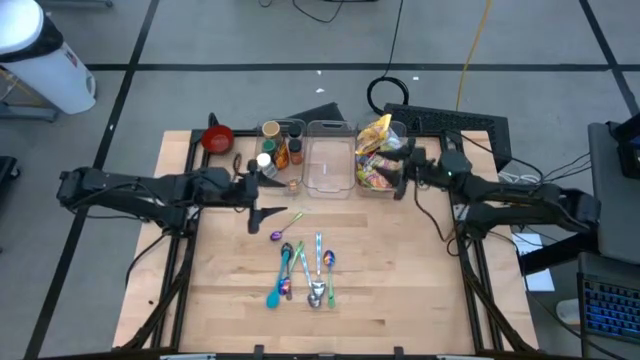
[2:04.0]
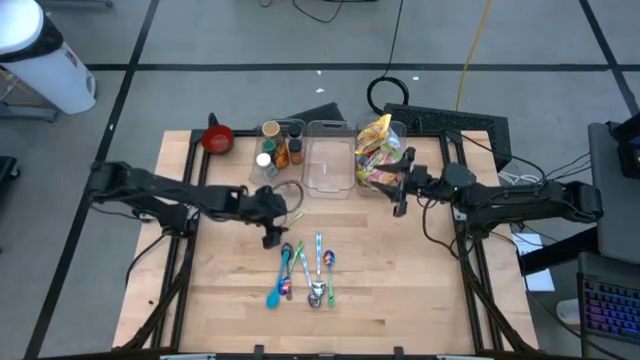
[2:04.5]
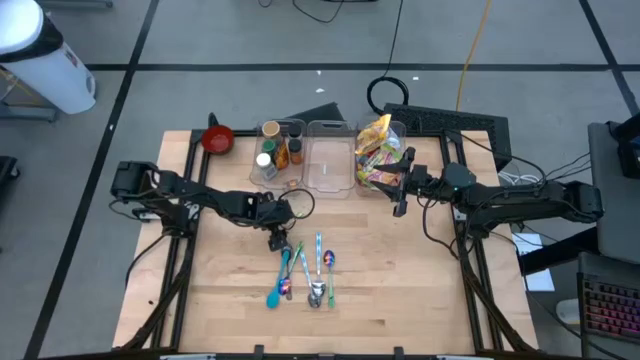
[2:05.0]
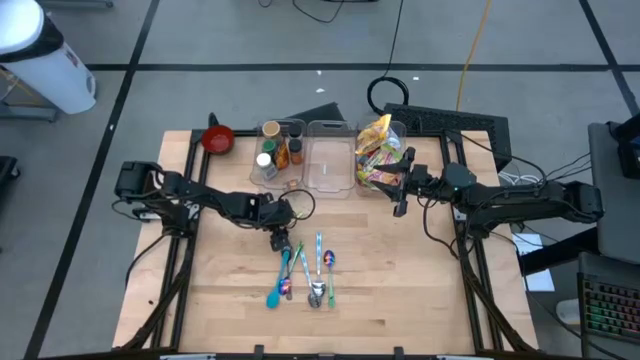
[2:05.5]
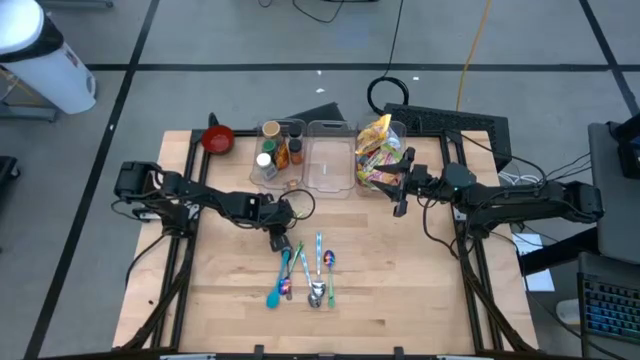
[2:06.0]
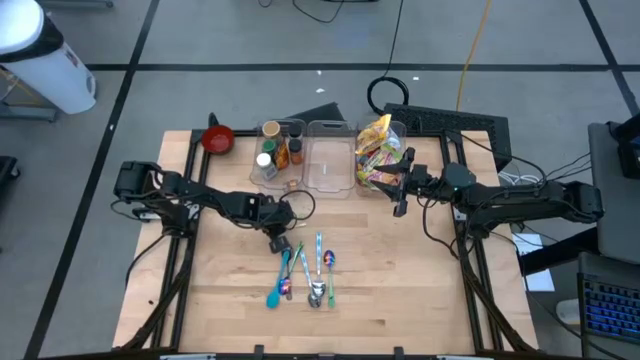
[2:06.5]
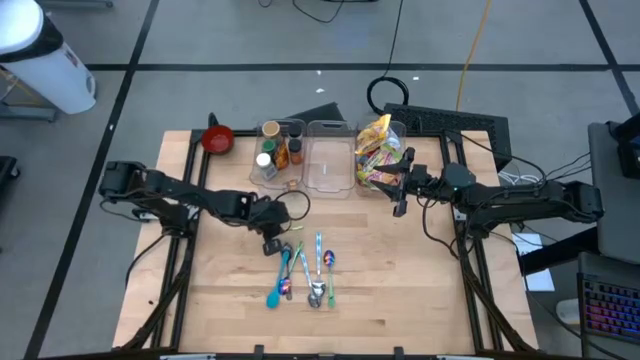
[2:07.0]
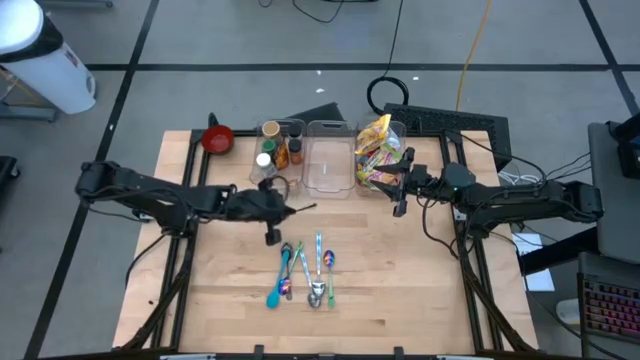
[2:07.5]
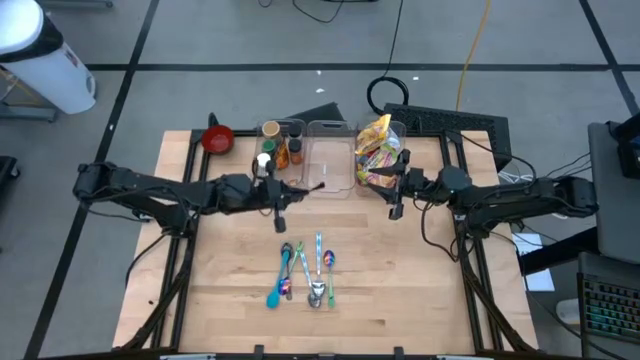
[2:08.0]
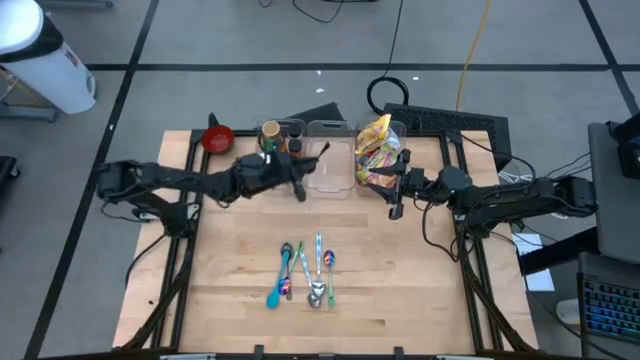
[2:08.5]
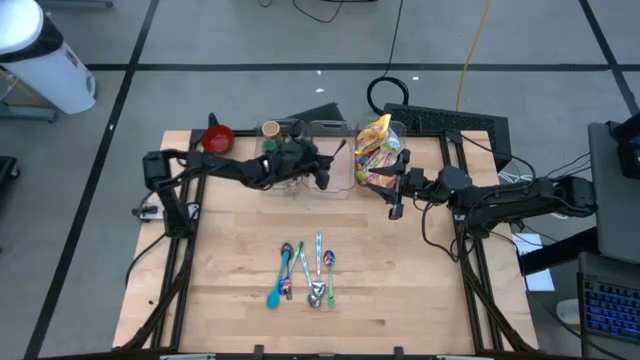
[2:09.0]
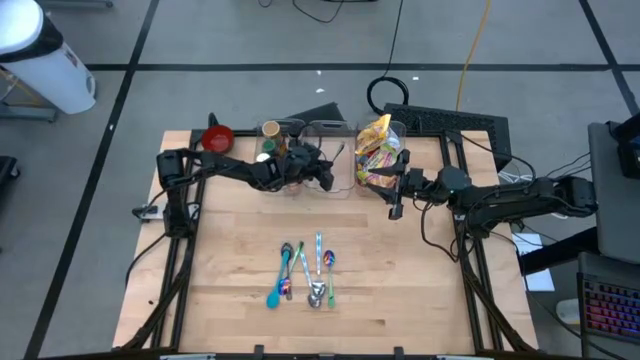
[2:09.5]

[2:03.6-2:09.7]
Task: Pick & Place Food Item
Put the top left purple green spoon into the middle transparent bin

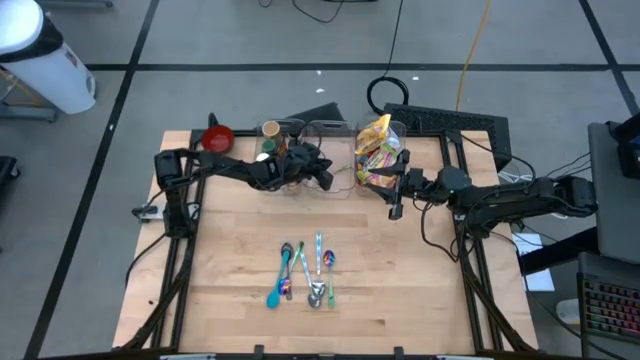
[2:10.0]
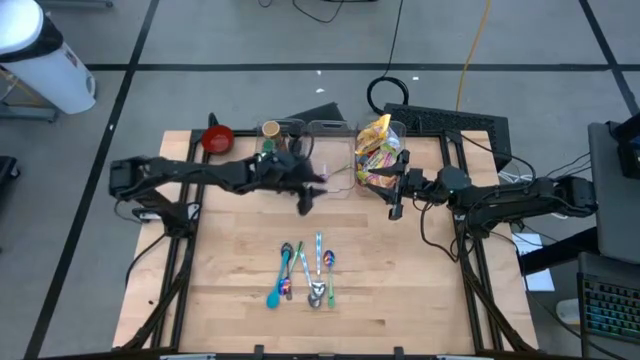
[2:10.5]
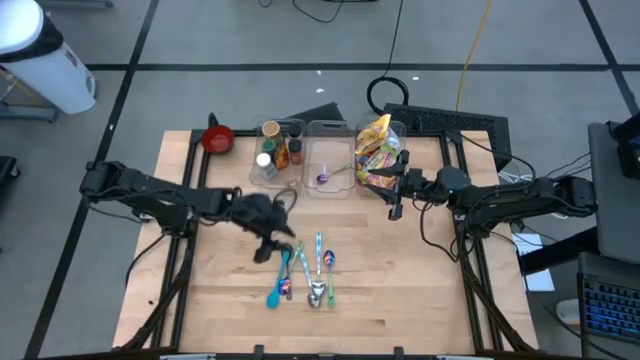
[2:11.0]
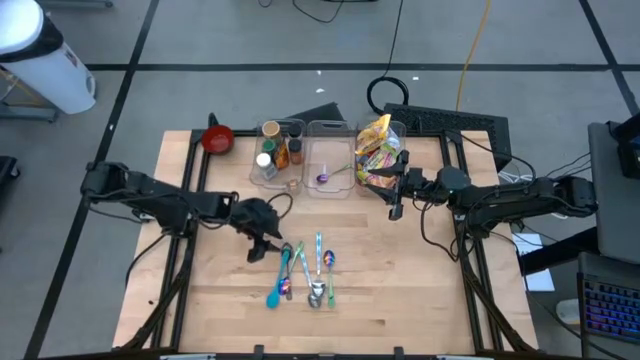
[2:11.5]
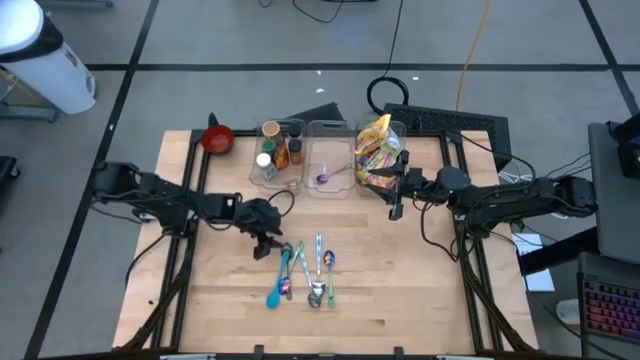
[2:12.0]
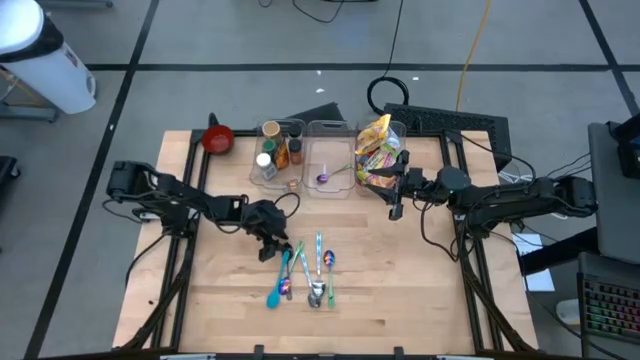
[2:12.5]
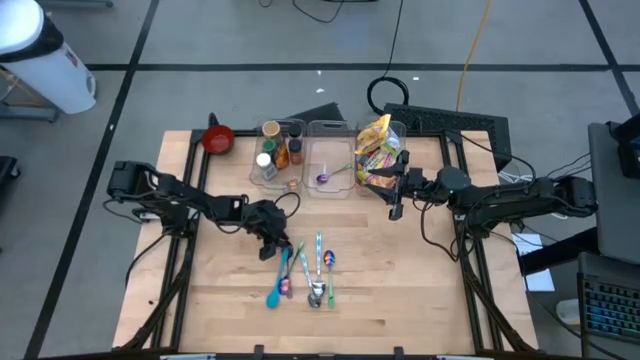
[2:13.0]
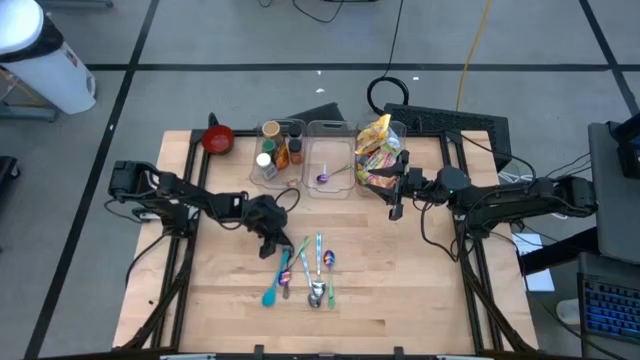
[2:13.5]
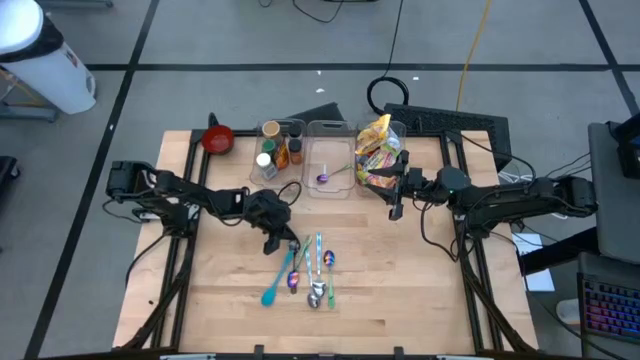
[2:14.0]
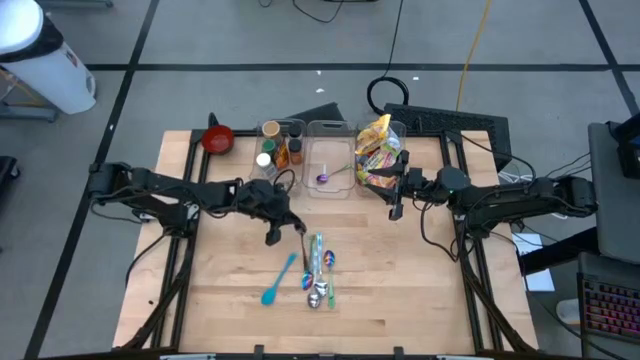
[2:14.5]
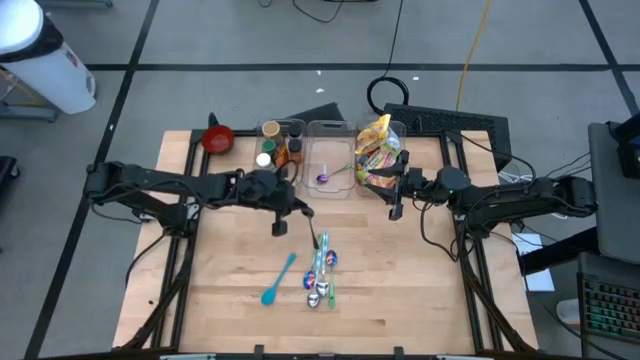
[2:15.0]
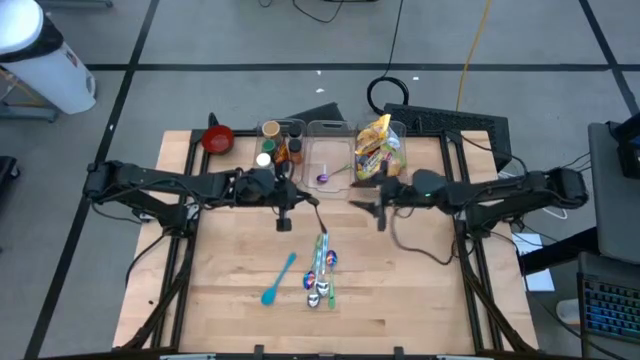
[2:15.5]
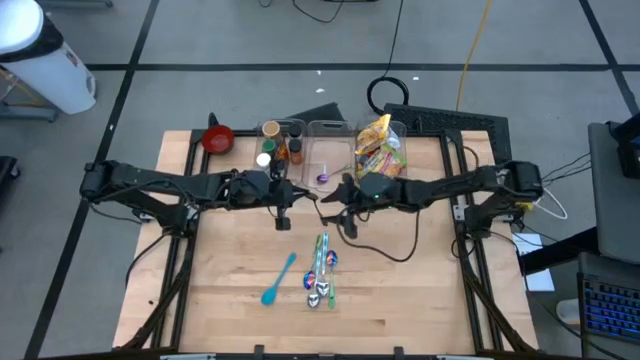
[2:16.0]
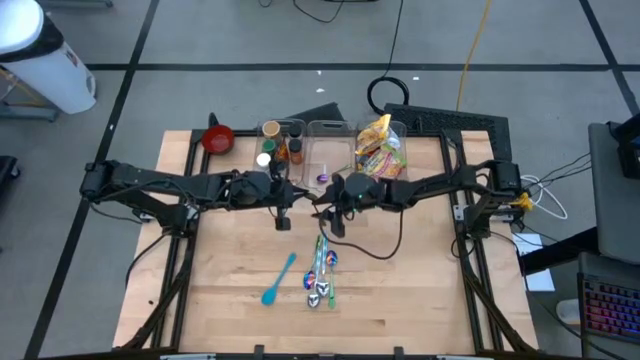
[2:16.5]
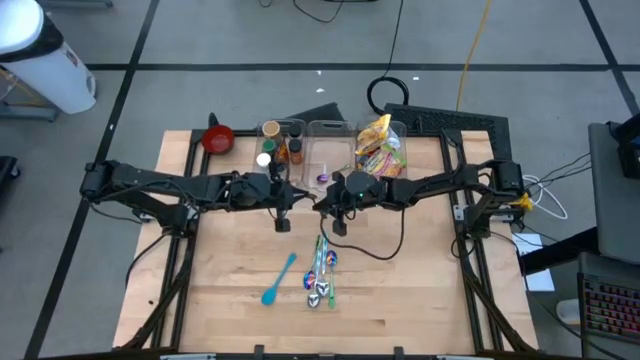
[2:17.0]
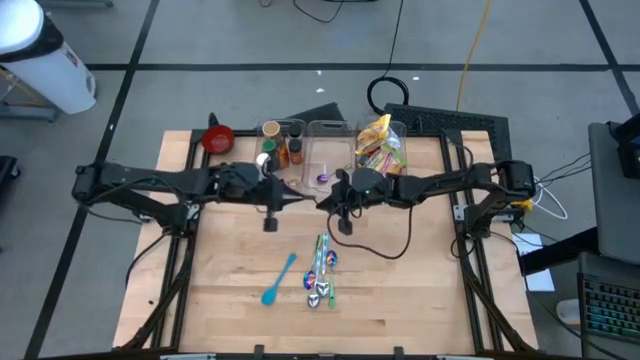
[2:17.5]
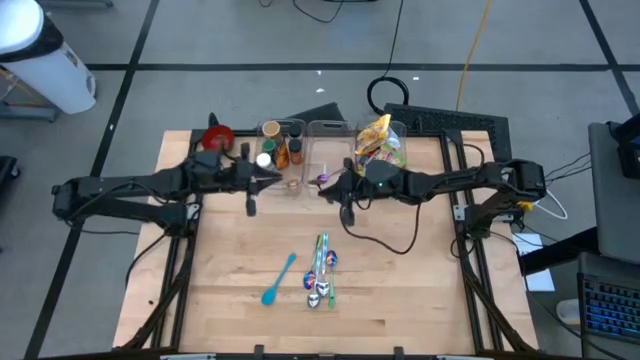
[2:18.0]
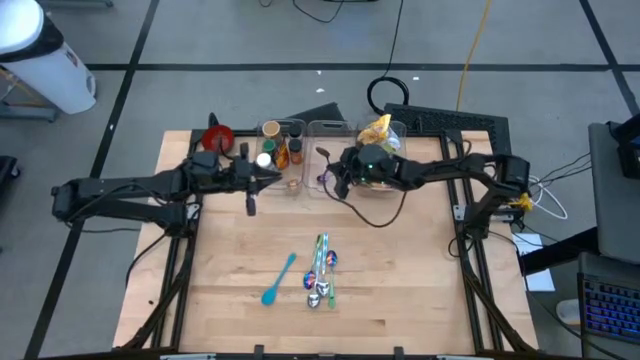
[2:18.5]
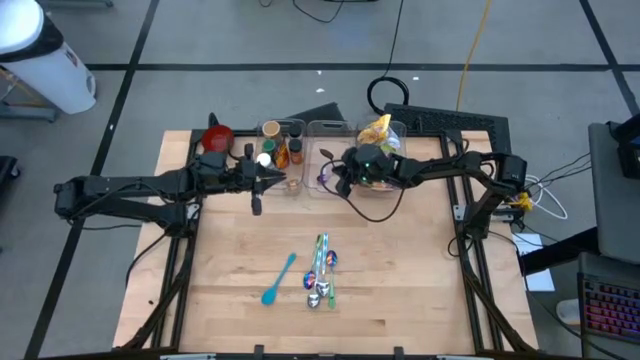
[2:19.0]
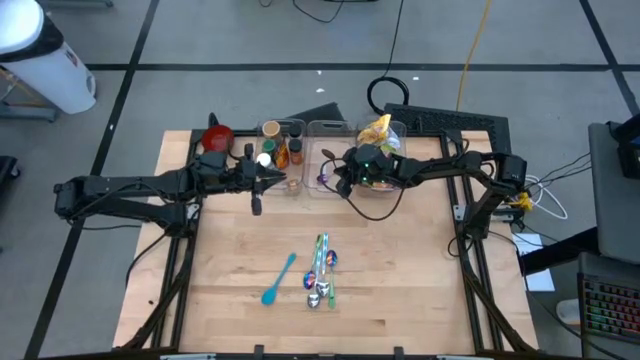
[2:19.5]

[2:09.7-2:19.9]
Put the black spoon into the middle transparent bin

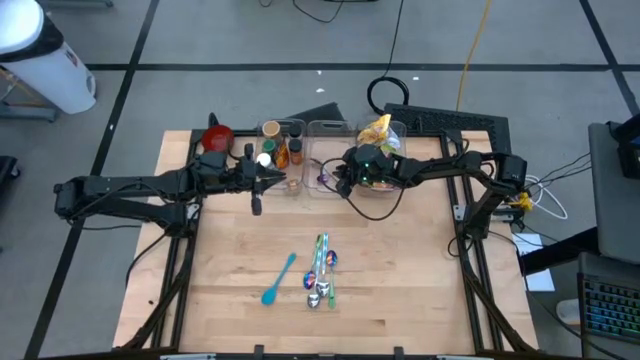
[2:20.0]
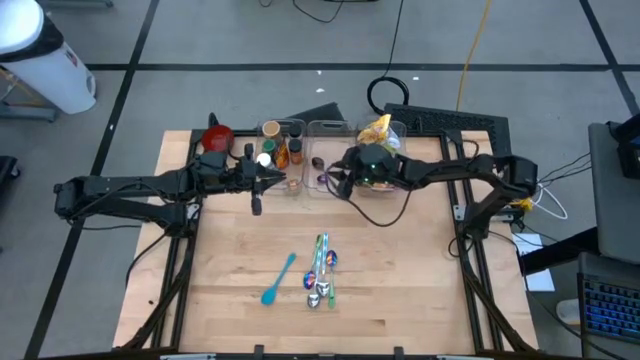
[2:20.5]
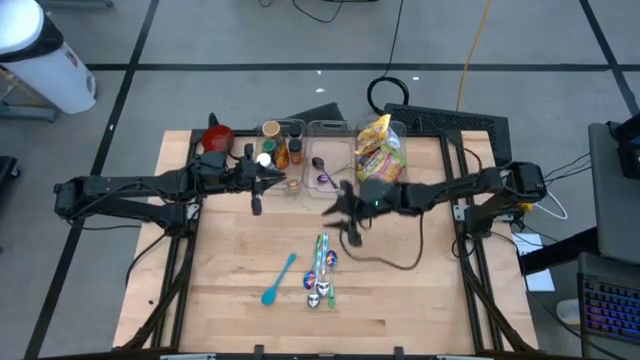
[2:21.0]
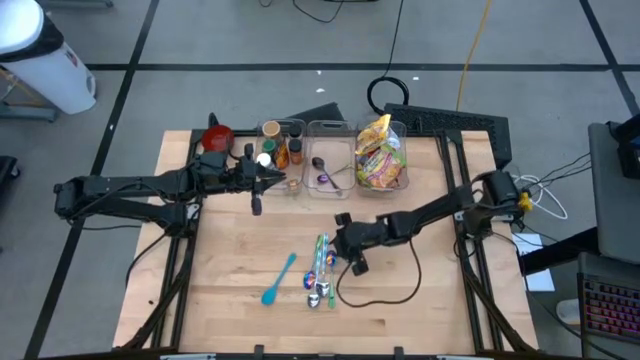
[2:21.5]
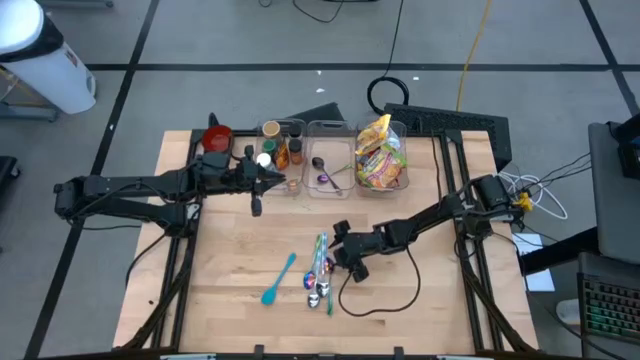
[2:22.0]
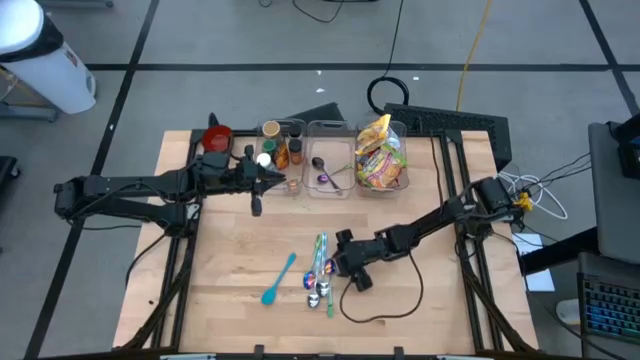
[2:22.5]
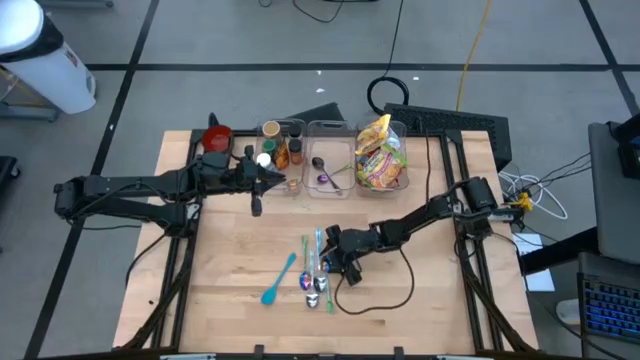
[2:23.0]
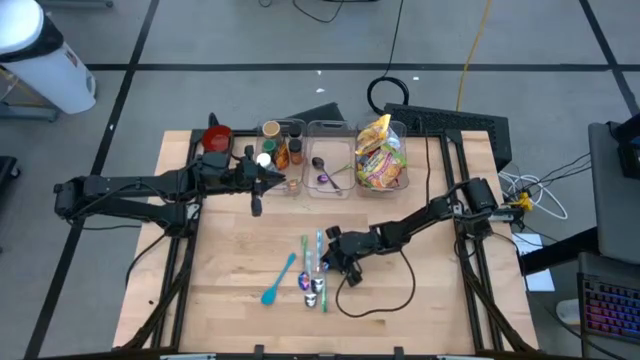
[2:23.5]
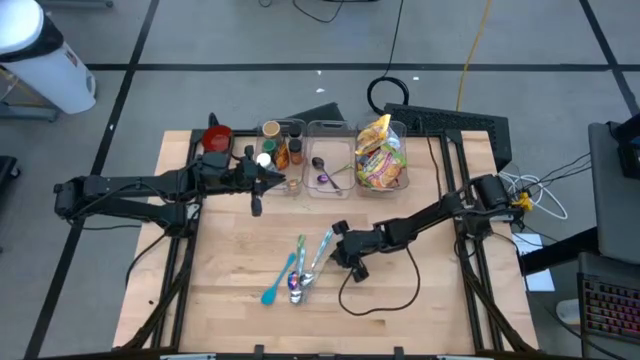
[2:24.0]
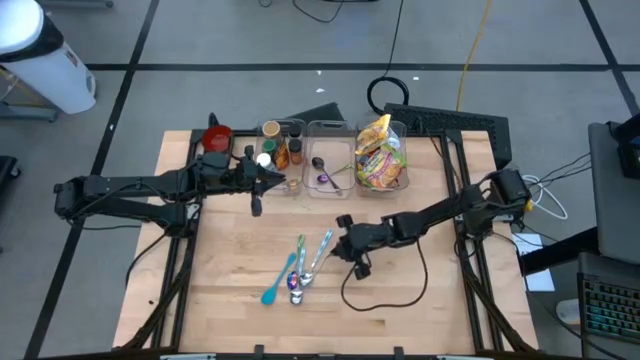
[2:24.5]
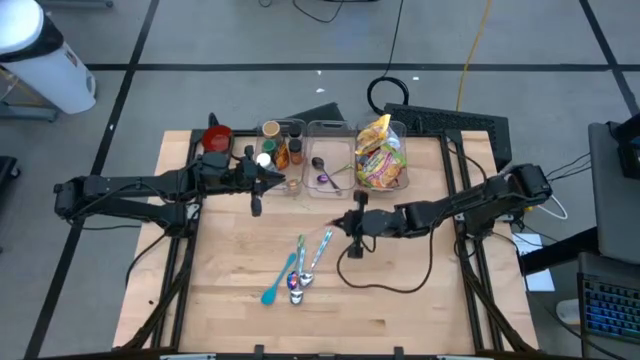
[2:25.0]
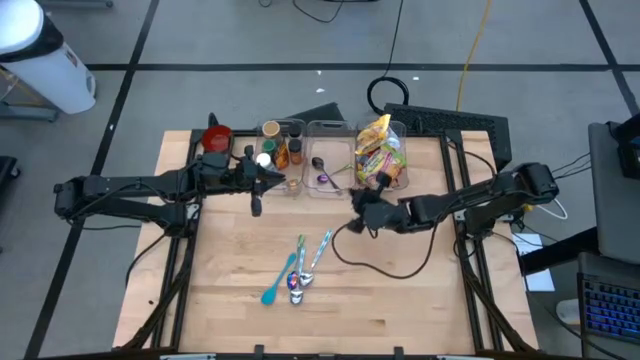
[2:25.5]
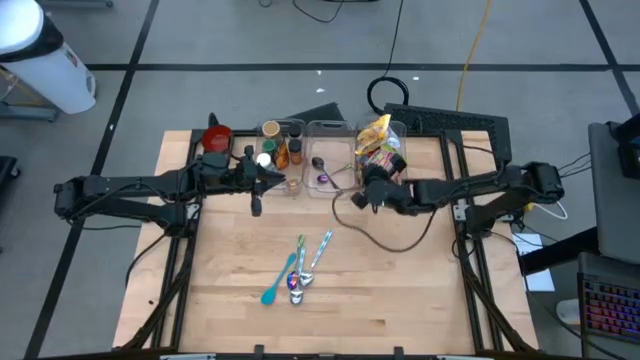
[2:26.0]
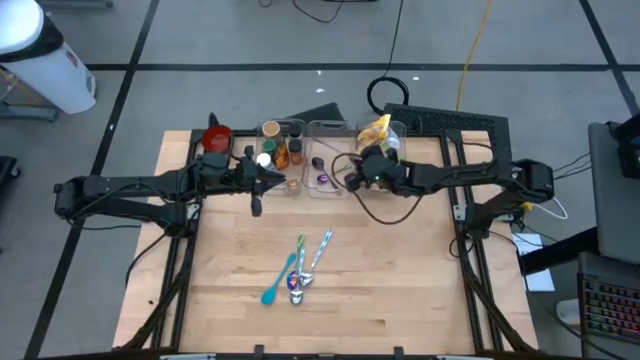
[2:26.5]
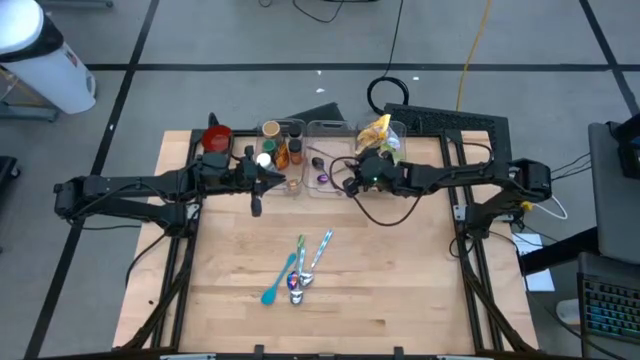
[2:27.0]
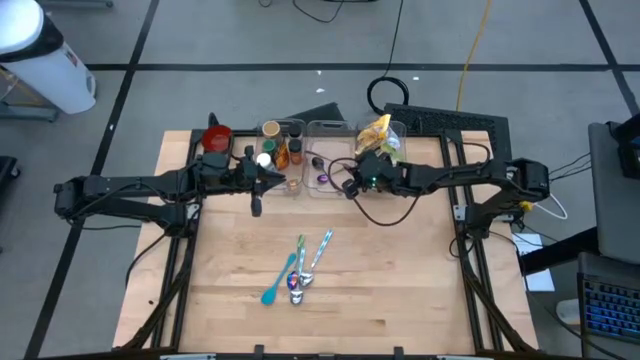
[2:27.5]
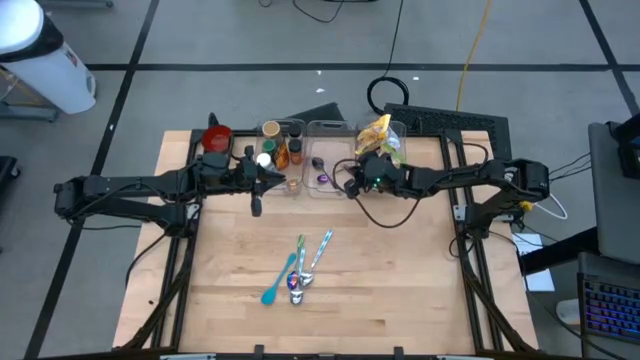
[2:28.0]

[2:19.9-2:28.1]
Put the right purple green spoon into the middle transparent bin
